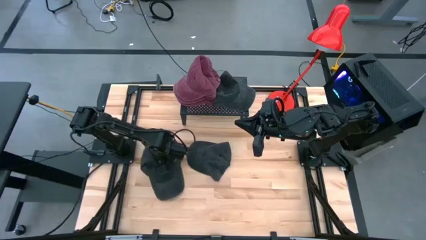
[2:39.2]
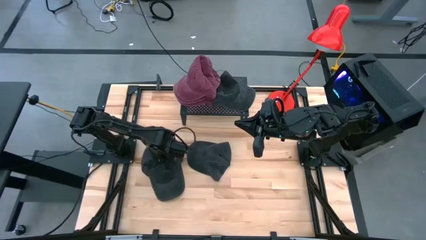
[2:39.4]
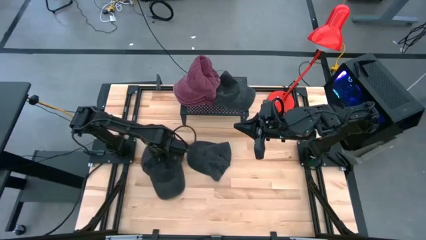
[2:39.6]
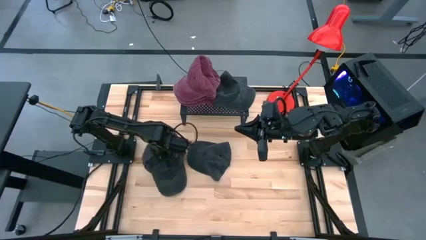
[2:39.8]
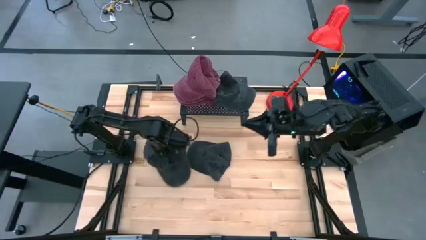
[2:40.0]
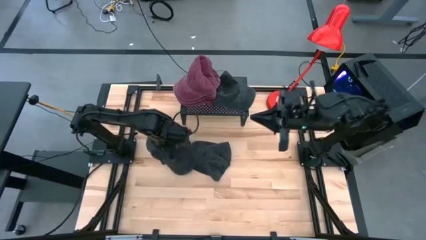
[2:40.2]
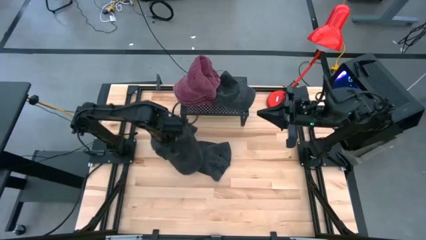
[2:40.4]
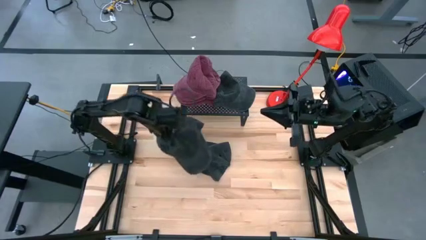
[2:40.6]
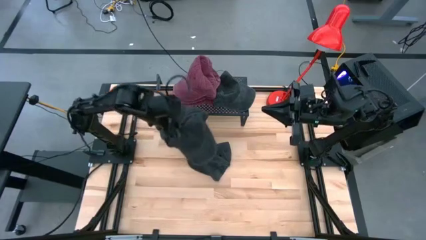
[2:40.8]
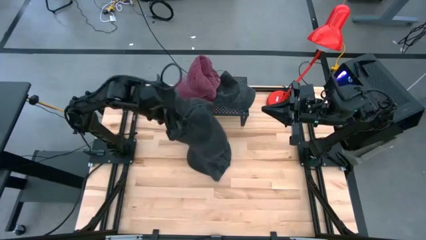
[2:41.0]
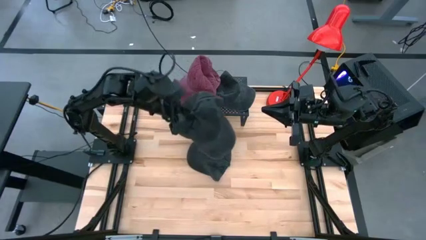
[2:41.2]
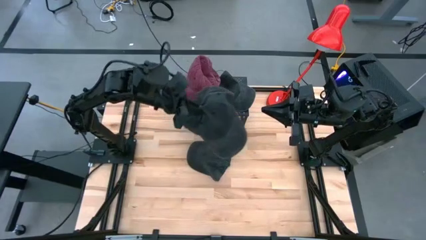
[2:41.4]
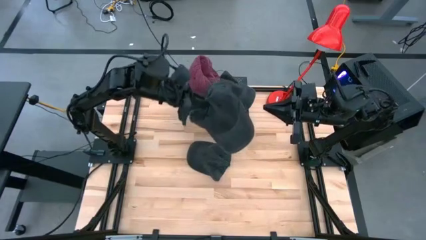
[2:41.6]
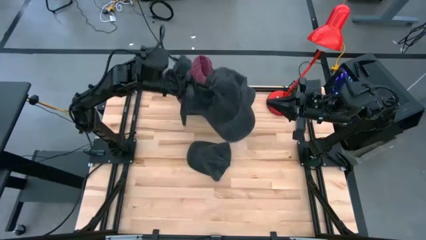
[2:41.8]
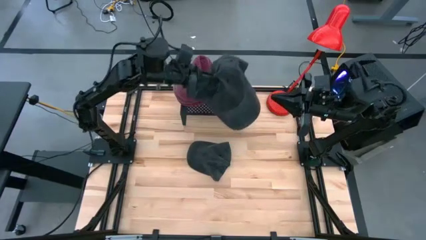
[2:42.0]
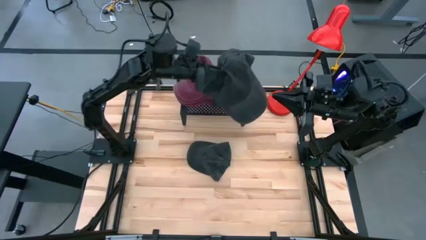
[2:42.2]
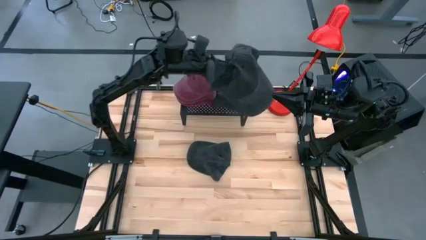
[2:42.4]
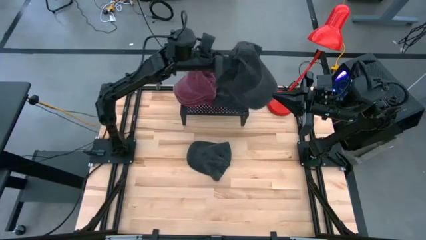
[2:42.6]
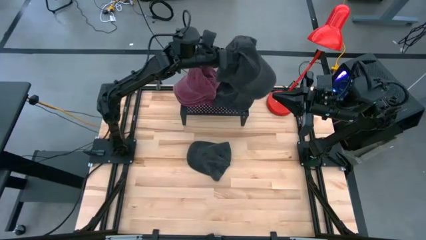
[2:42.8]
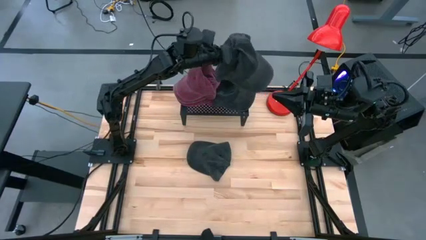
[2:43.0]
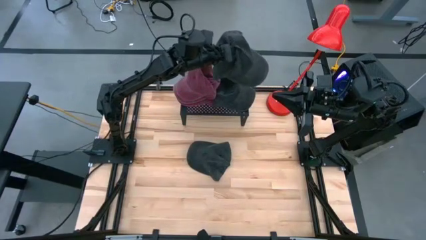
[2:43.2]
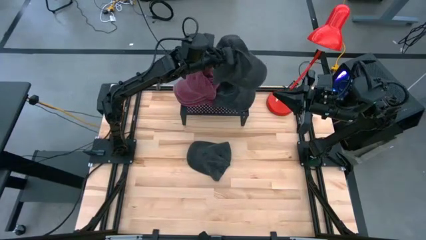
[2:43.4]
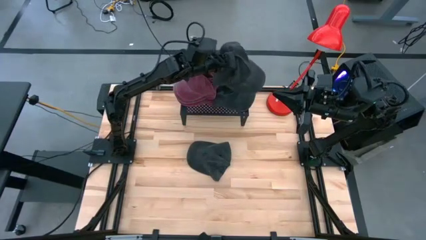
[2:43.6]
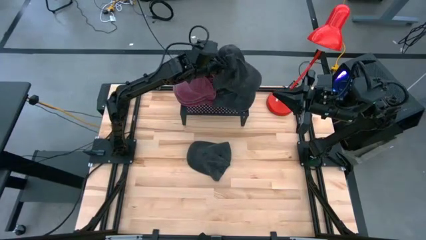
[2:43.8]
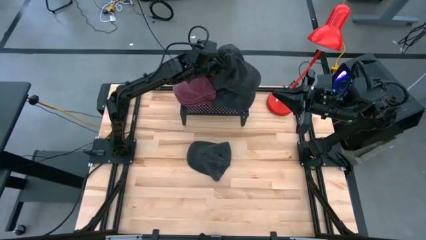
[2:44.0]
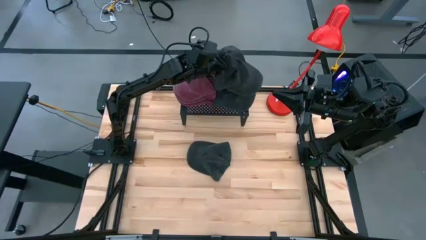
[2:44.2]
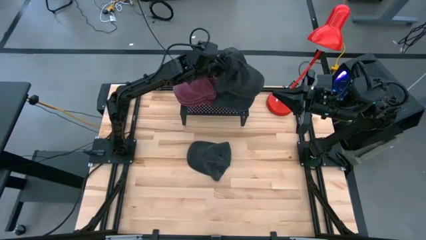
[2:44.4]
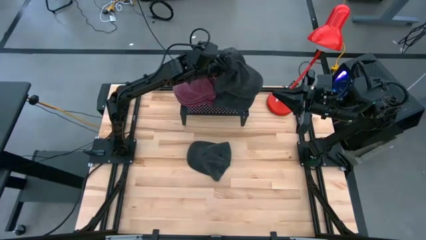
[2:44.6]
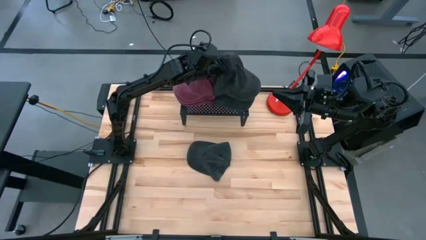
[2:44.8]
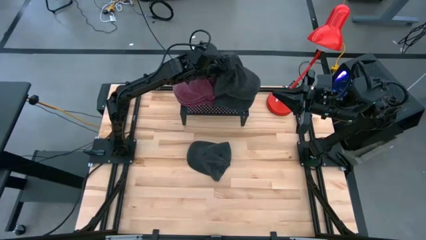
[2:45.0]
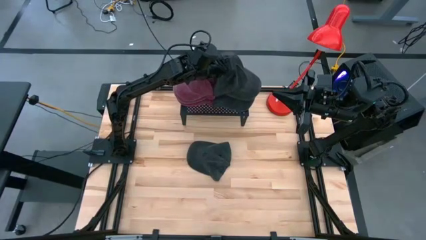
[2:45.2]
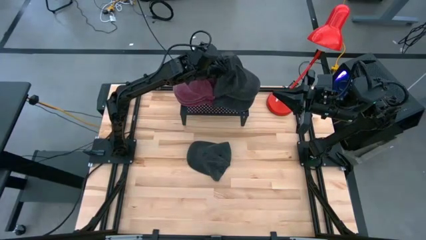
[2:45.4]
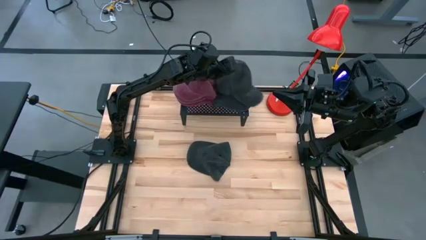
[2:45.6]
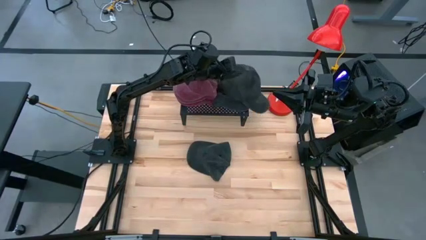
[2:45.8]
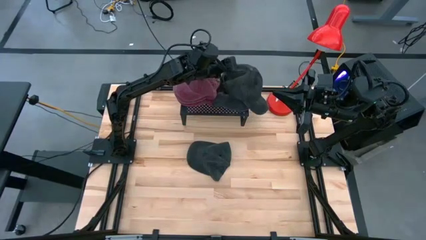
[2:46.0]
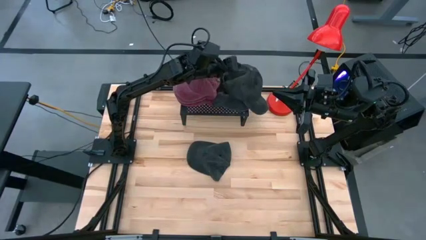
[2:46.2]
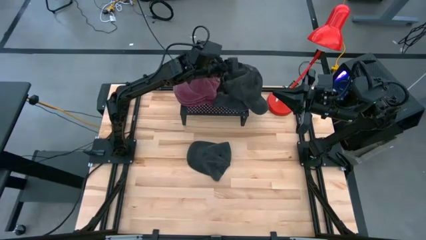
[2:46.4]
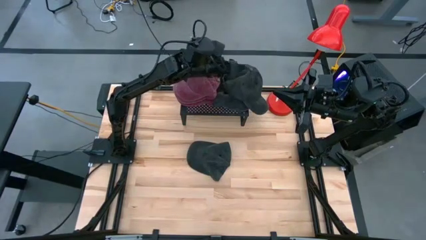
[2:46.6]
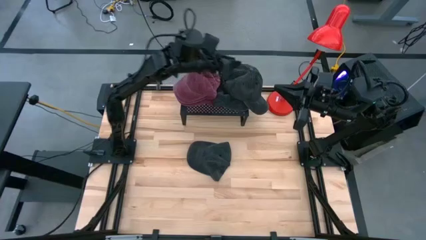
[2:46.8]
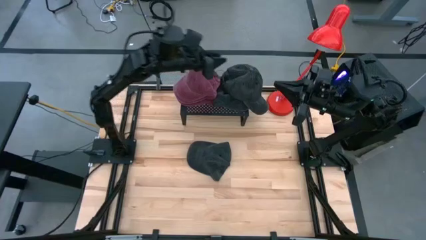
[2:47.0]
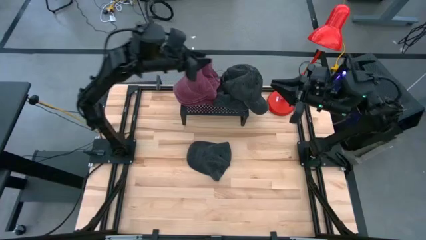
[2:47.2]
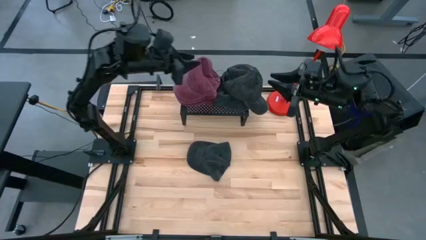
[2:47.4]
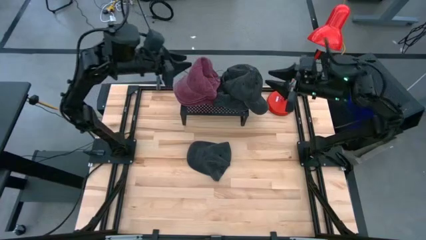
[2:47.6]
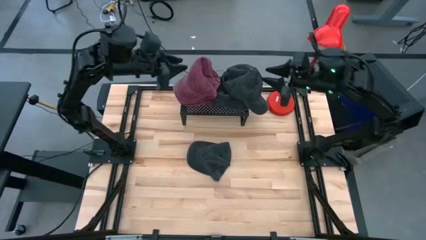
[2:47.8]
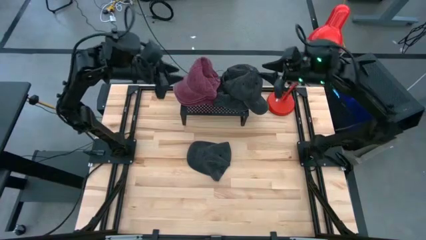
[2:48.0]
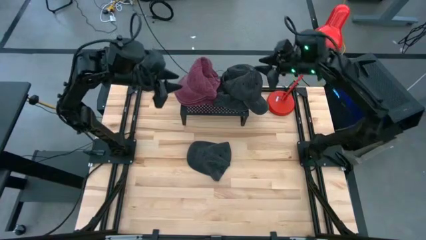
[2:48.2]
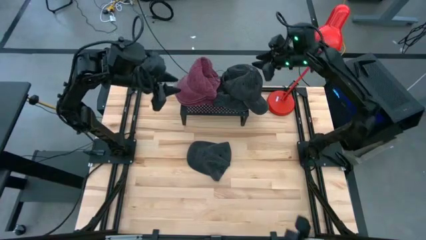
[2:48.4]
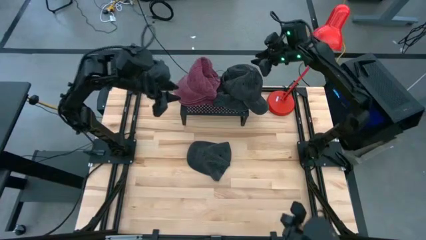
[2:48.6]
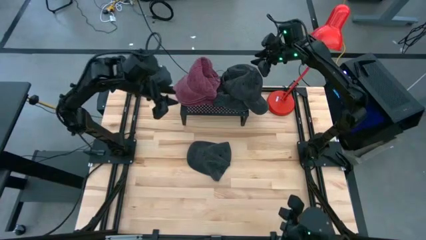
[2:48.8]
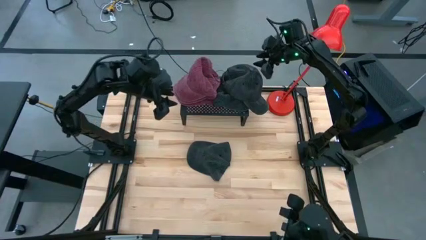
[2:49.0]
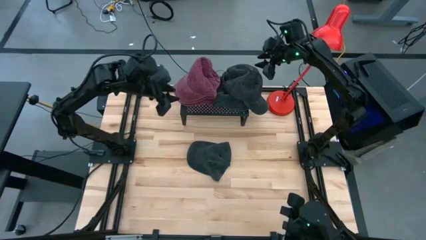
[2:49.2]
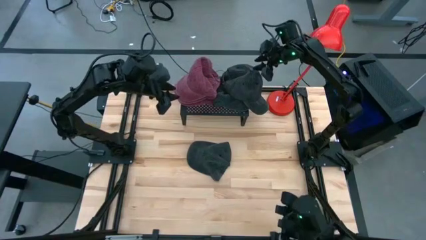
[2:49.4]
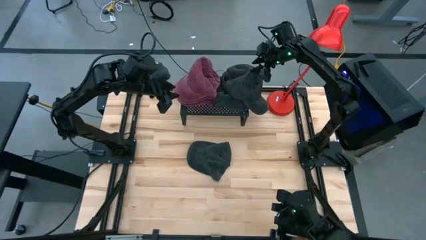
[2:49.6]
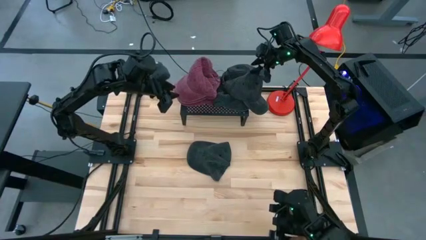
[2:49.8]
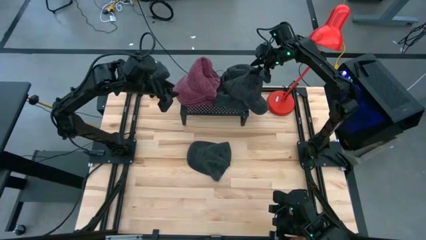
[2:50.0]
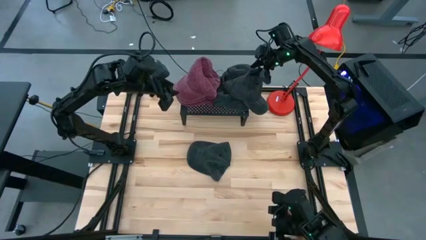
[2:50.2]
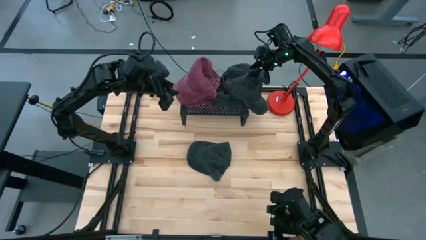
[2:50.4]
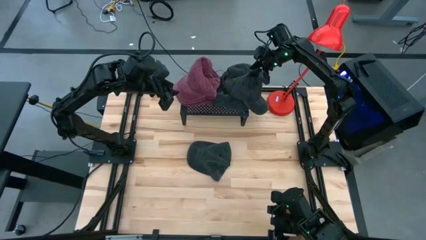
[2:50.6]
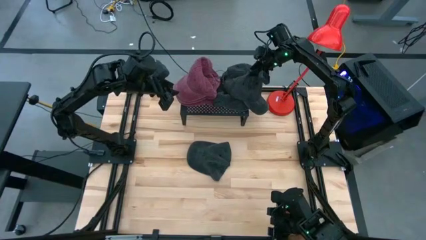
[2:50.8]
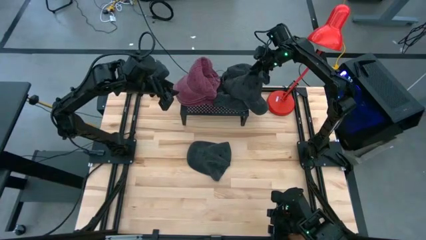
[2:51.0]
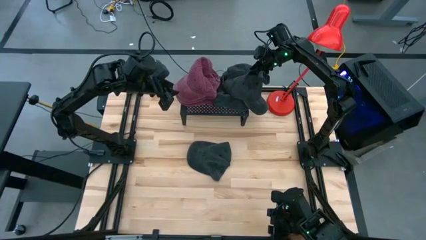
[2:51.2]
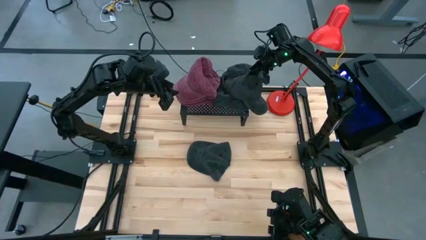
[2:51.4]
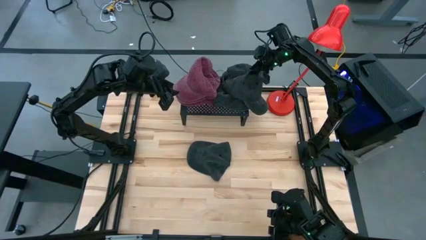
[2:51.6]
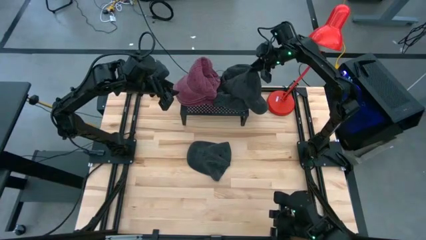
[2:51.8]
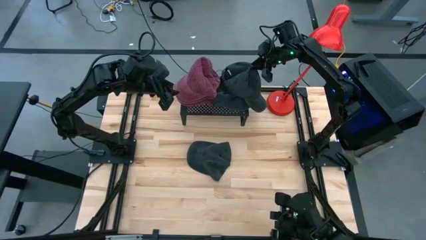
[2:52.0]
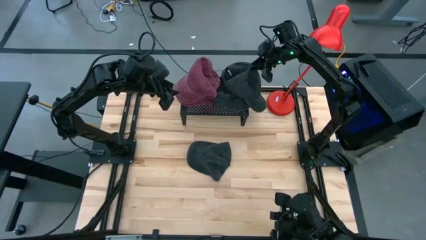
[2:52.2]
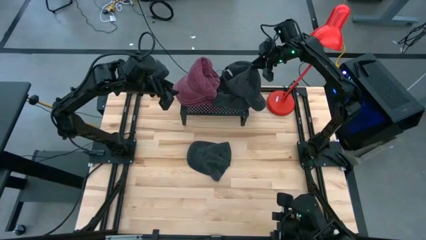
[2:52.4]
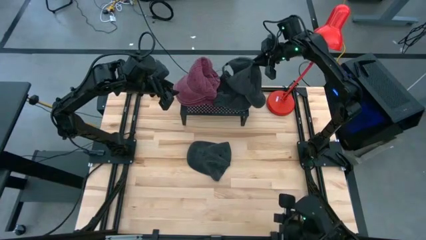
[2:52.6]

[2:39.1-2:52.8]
Task: Pick & Place hat
Put the left black cap on top of the black cap on the shelf

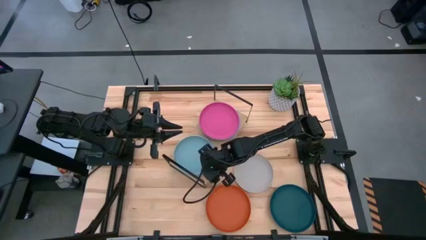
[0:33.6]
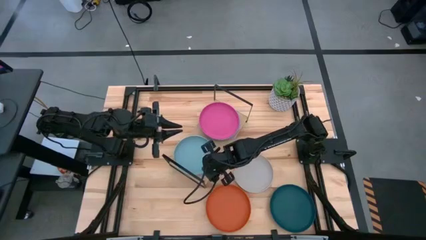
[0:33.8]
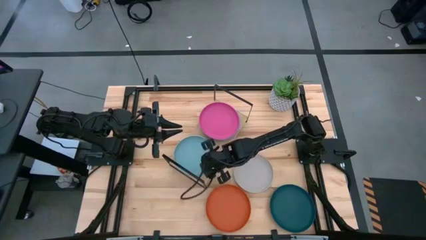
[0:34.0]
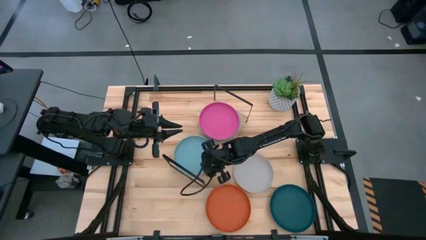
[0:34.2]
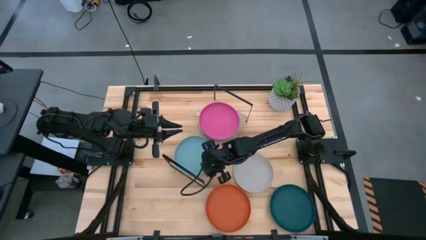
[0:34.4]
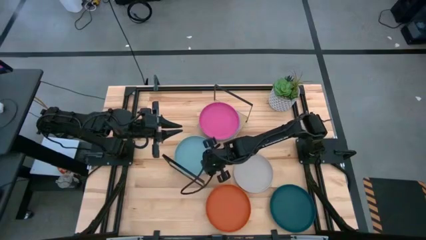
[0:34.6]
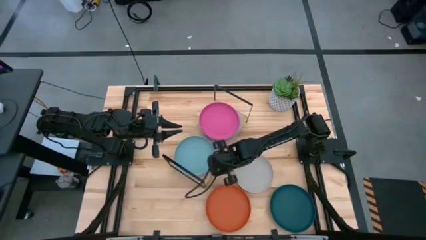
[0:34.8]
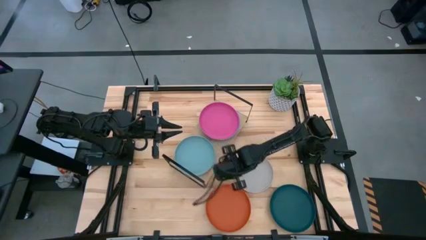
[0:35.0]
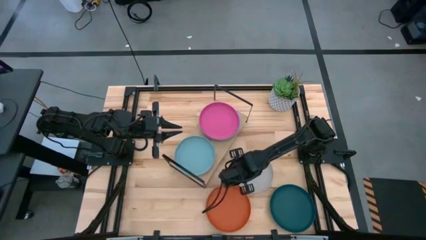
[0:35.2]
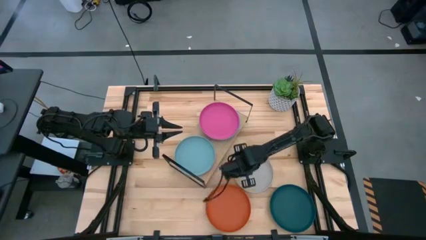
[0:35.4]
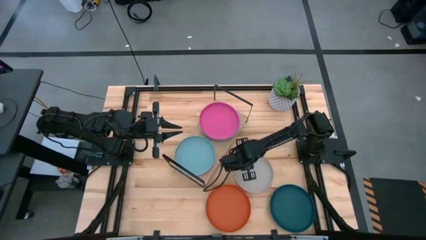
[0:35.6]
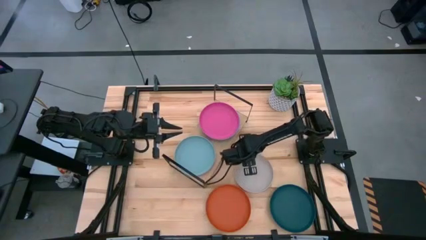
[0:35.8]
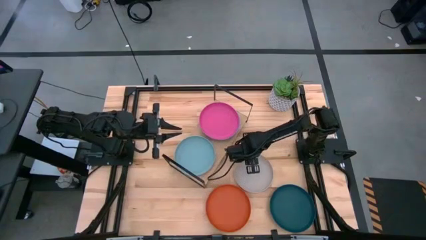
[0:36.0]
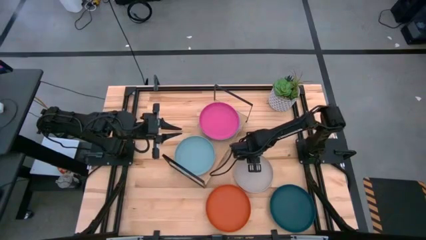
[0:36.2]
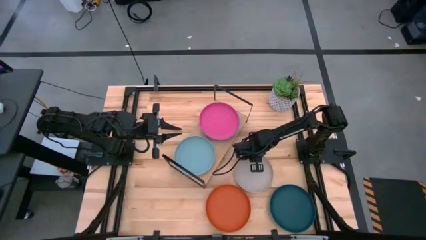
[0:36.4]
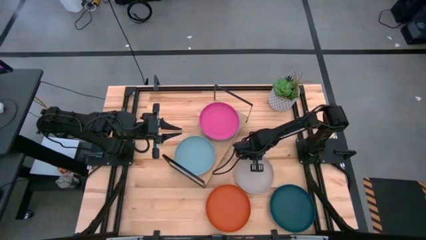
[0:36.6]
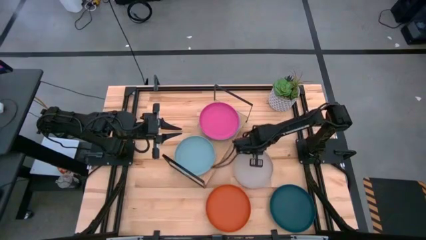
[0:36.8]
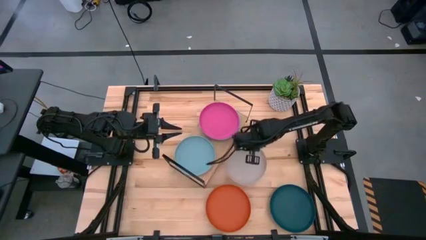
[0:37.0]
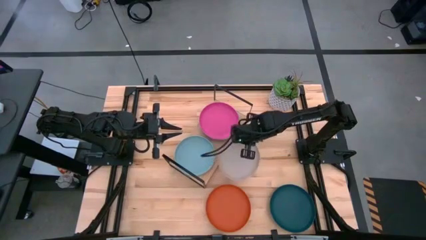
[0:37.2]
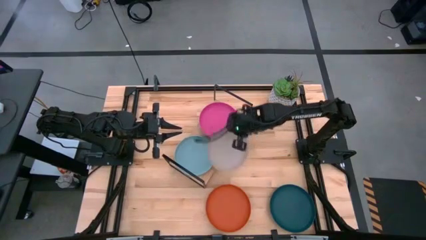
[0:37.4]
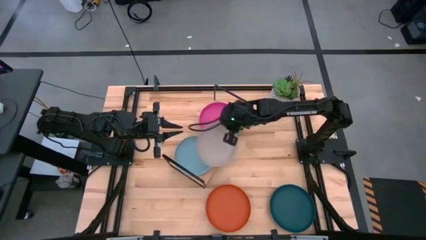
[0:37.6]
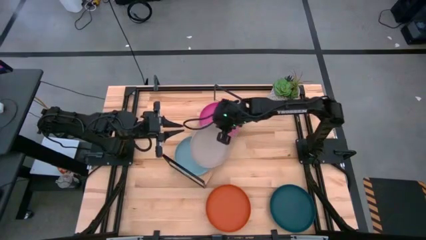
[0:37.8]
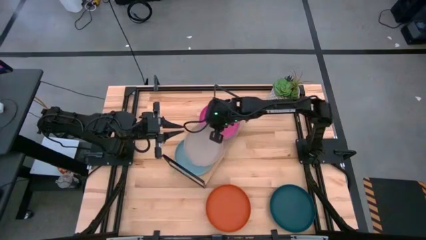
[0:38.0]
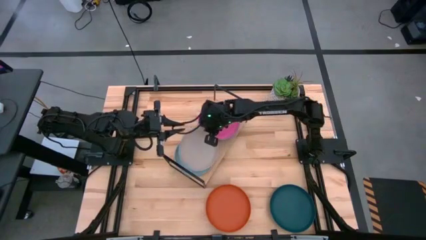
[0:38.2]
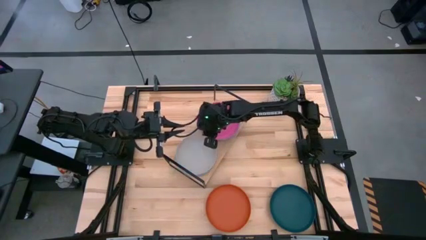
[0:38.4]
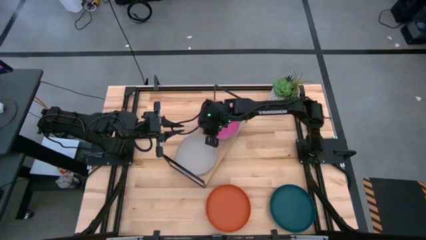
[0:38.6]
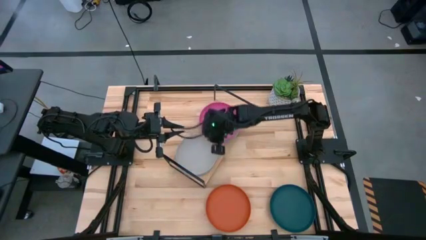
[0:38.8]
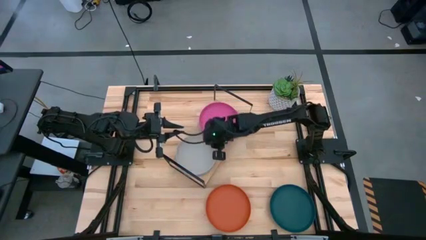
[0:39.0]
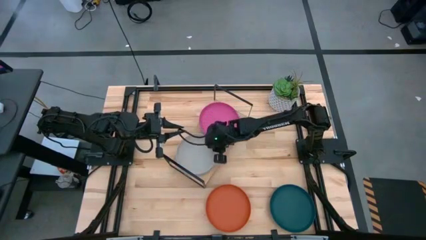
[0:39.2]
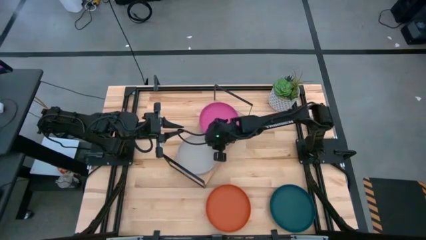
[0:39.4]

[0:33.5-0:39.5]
Task: Place and stack plates onto a shelf
Stack the grey plate on top of the light blue plate on the shelf
